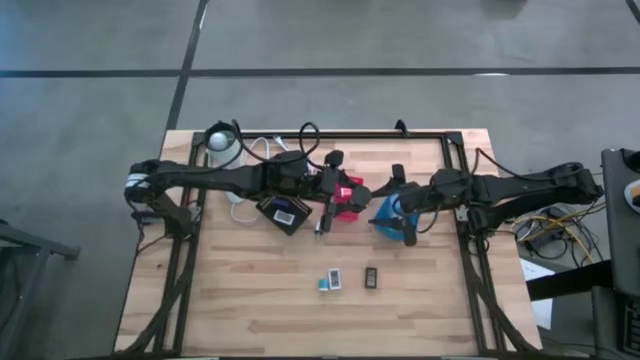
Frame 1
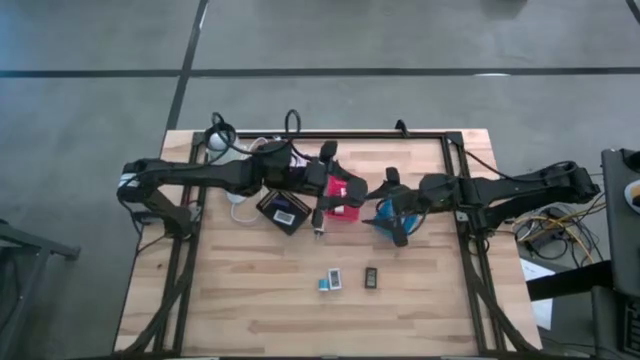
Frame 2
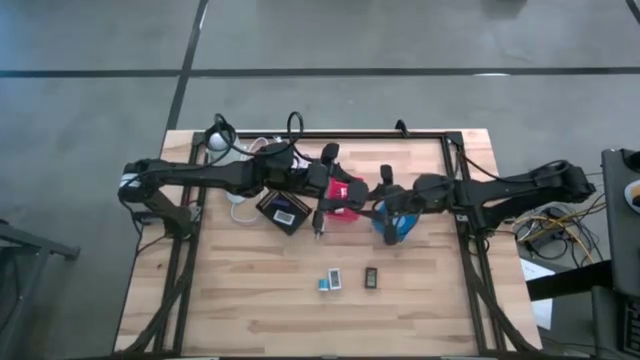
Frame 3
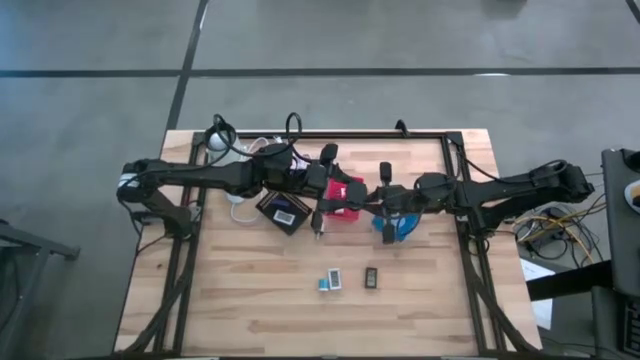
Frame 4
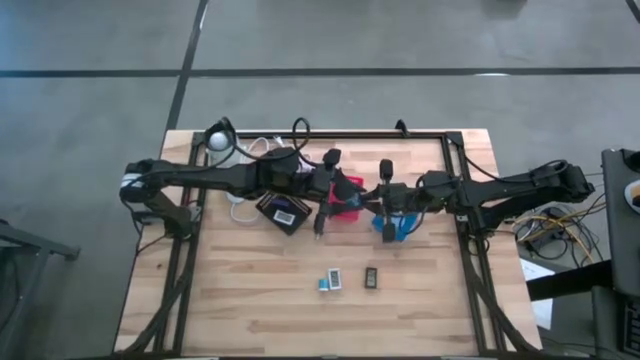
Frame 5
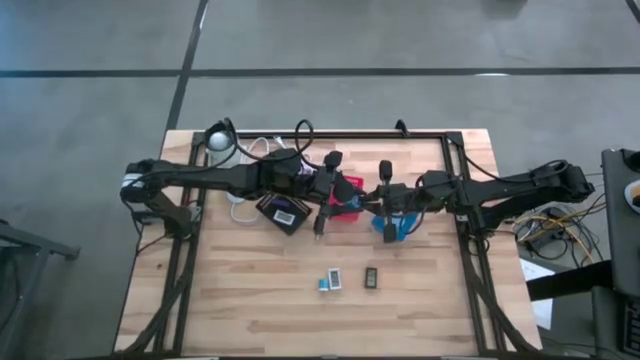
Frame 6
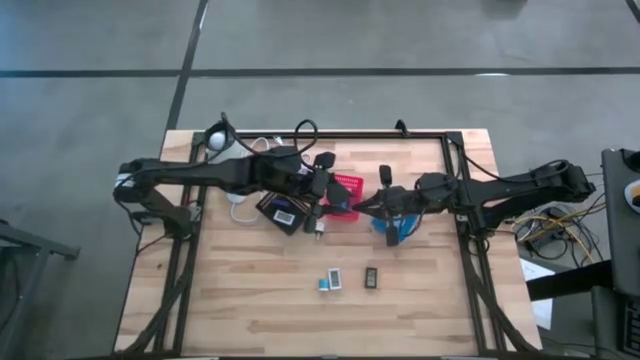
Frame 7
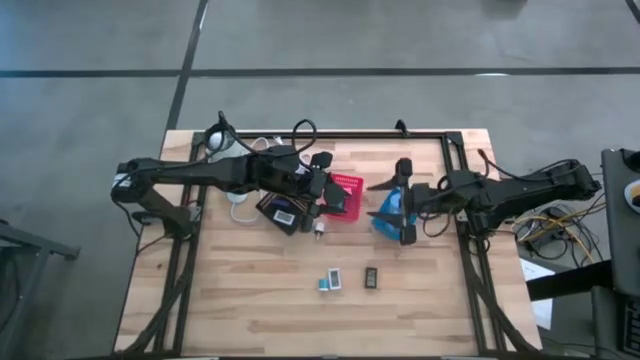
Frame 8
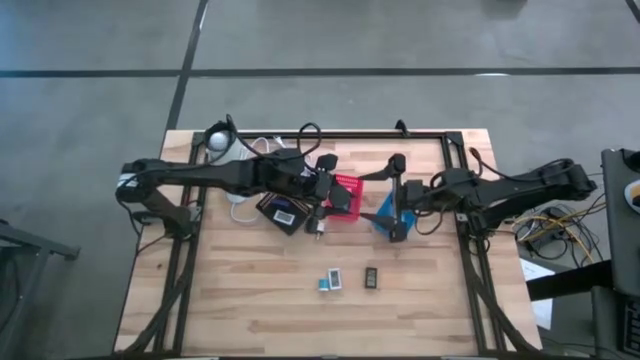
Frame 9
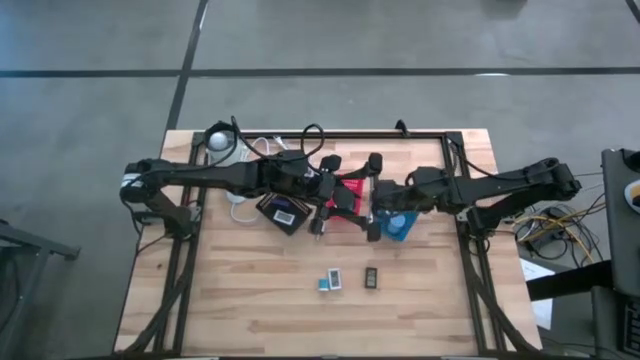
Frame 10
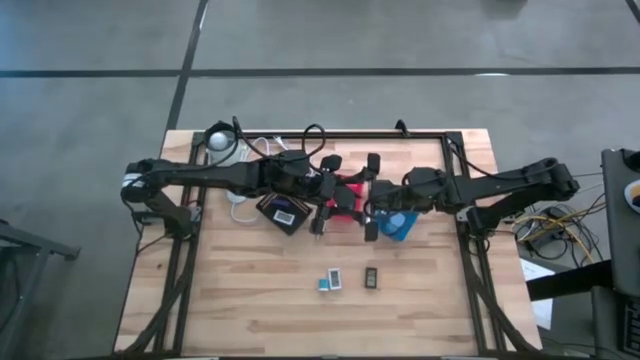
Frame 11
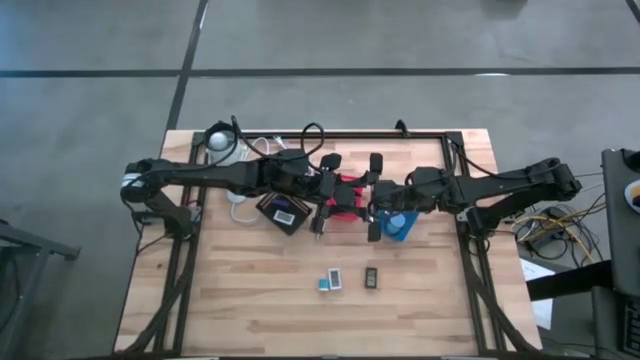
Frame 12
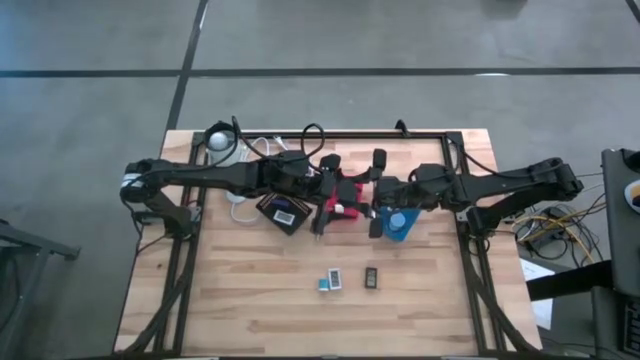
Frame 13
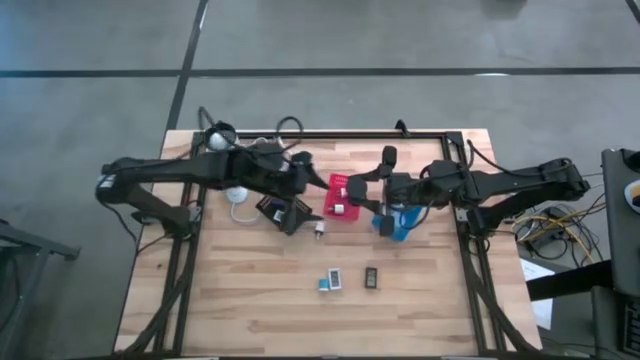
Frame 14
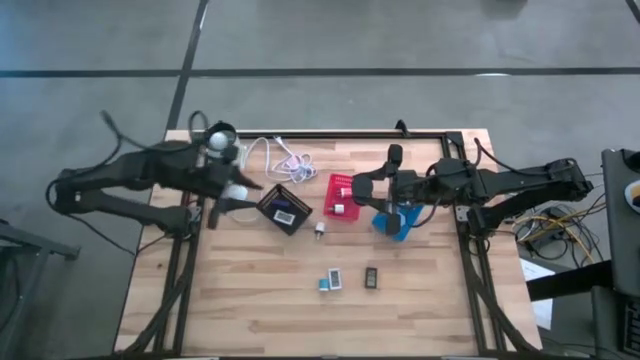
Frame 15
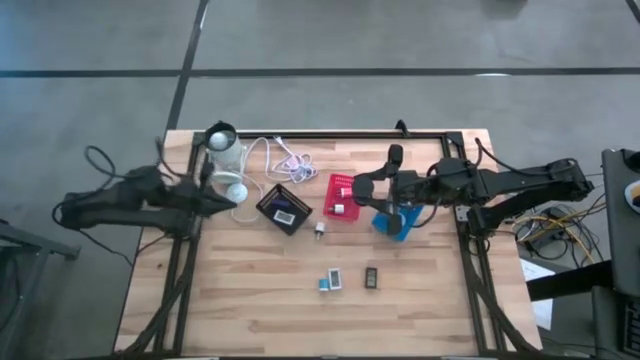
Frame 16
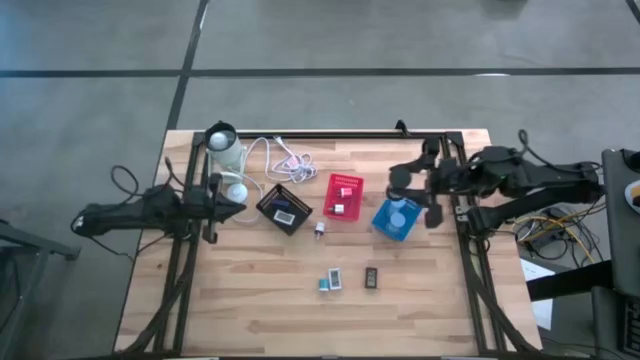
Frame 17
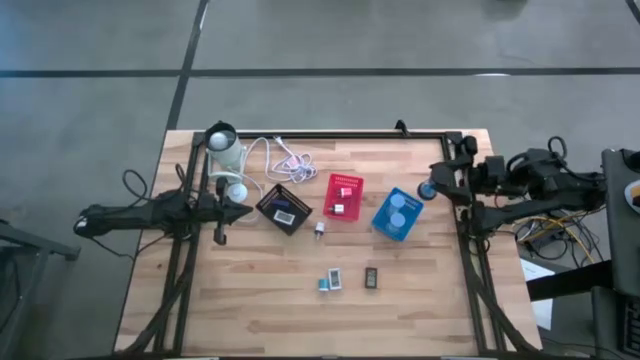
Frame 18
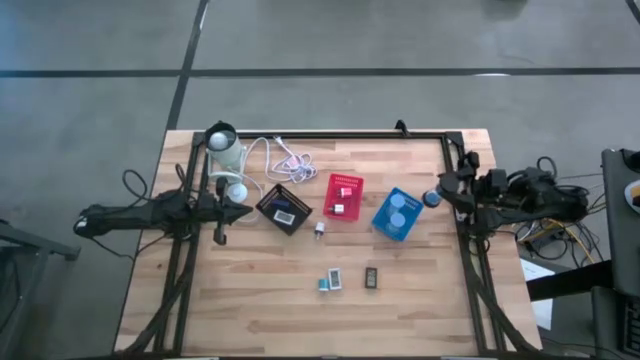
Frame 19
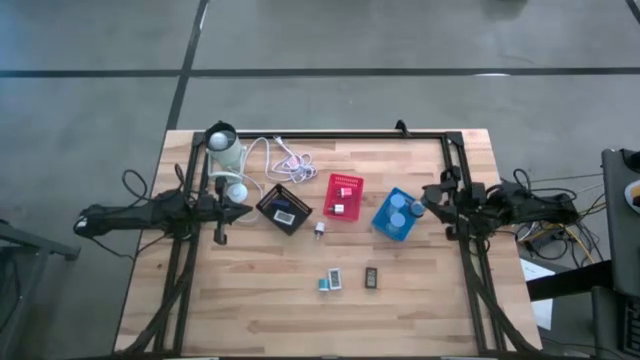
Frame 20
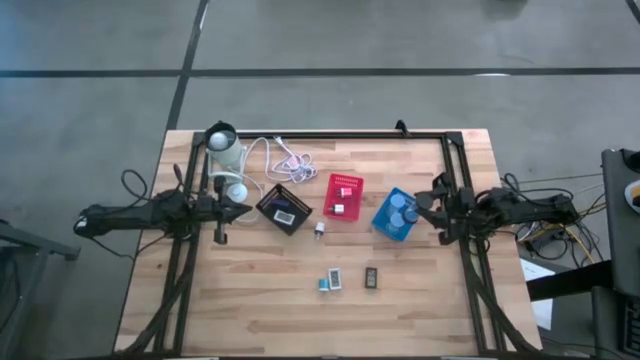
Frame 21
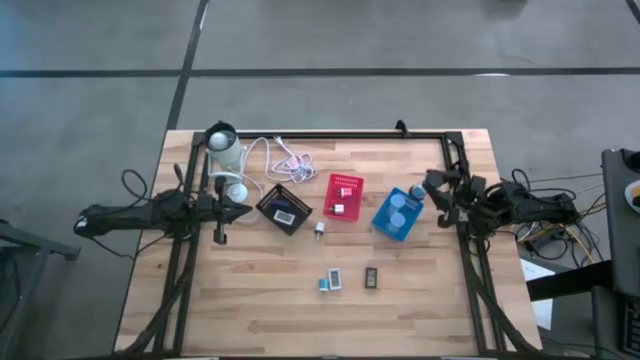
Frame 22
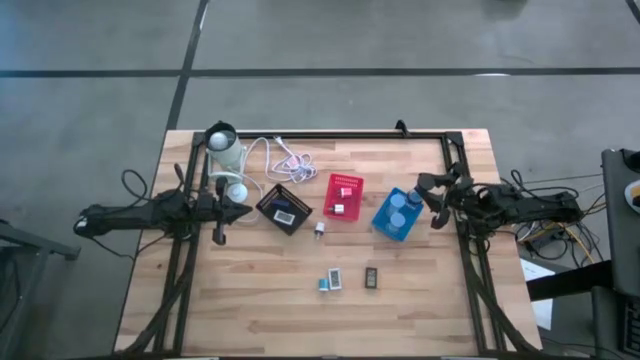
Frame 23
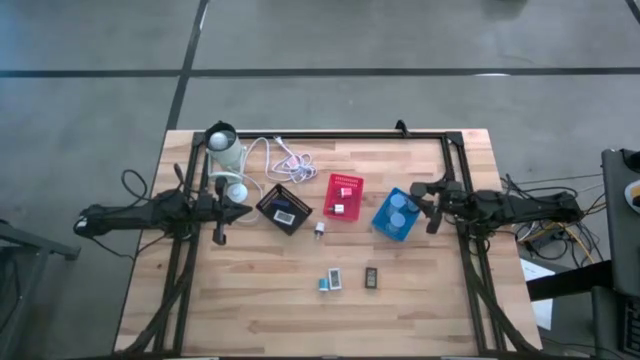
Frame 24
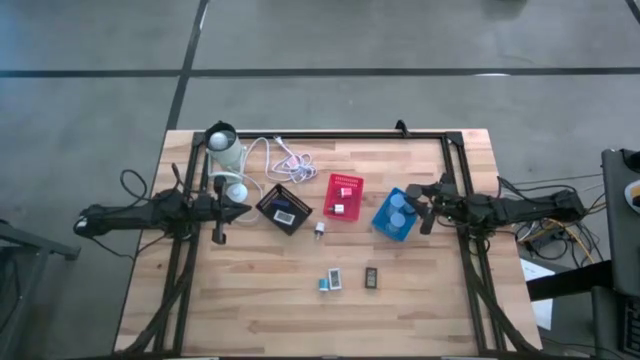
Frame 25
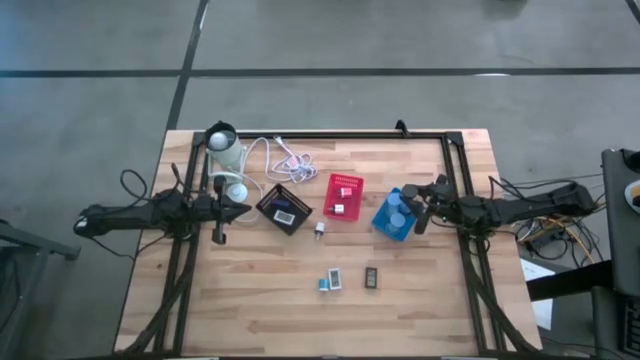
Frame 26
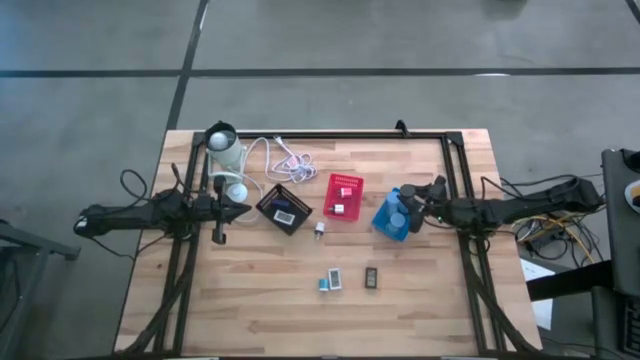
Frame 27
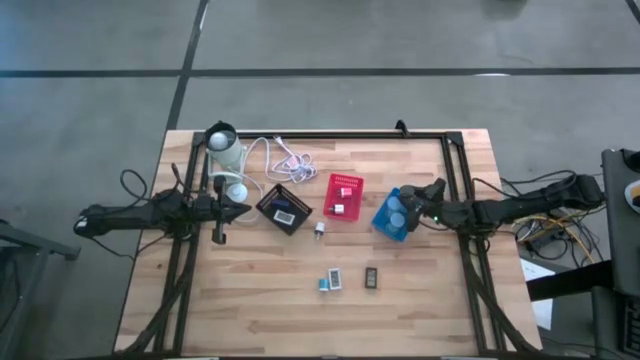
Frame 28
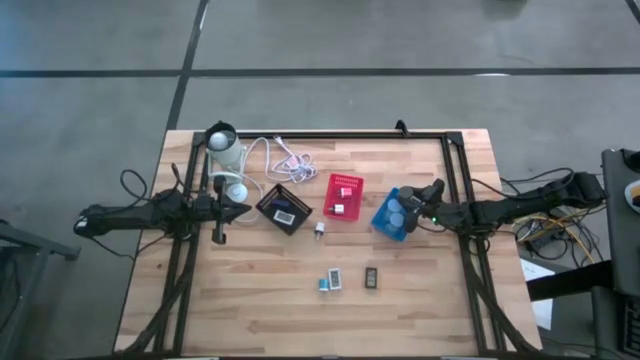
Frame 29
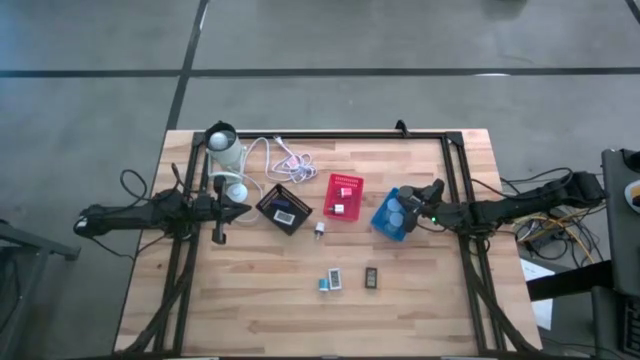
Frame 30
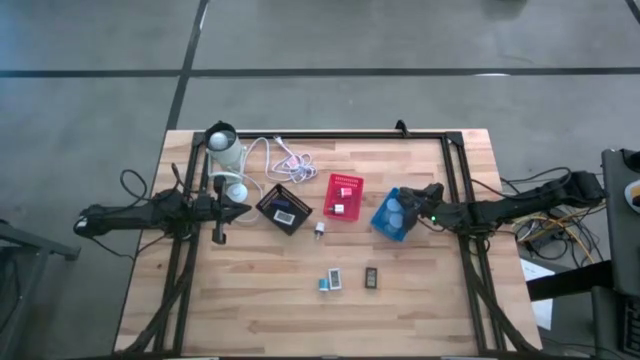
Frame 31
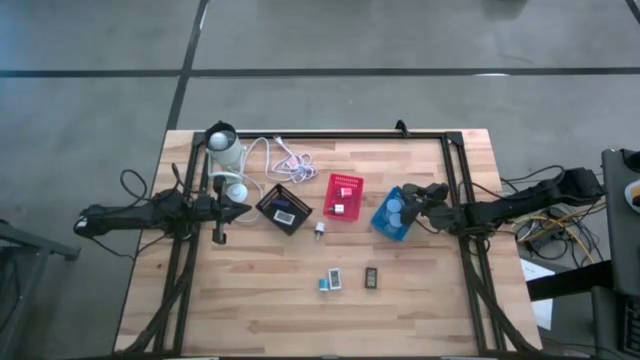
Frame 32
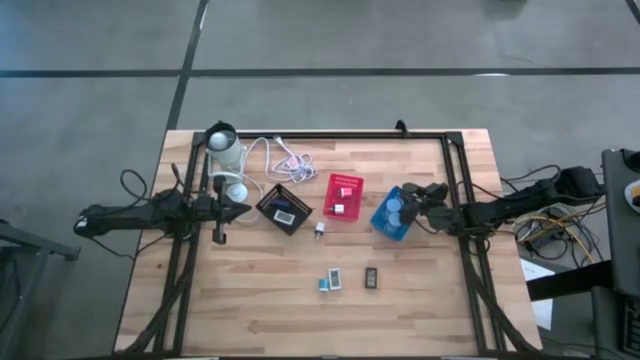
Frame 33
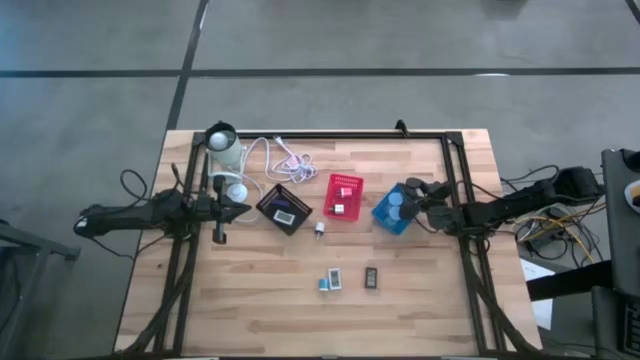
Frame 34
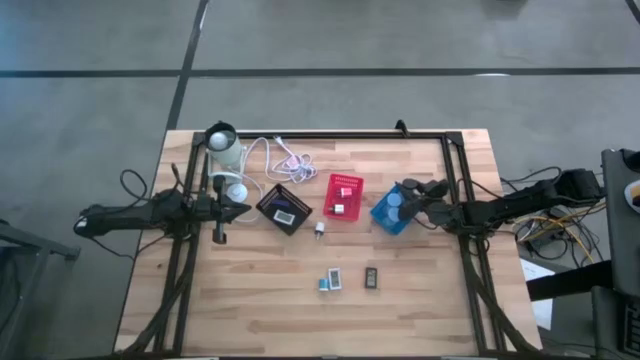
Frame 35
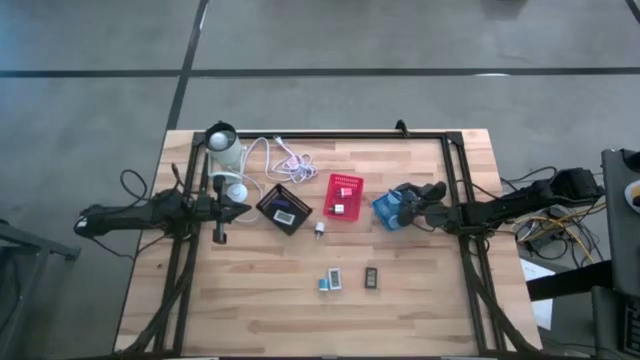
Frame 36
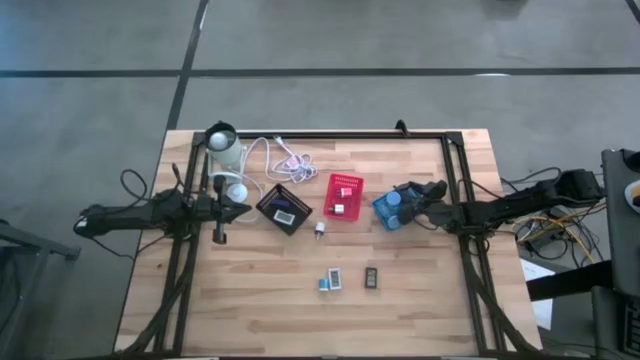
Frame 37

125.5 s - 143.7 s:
Task: Pick & Place Office items
Put the black hourglass into the blue basket

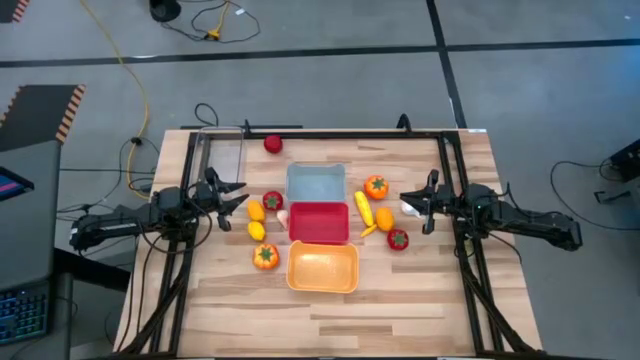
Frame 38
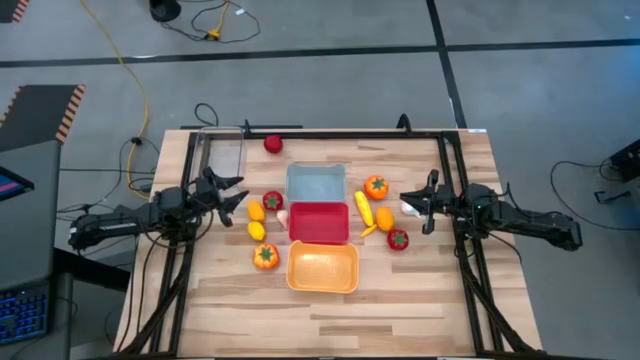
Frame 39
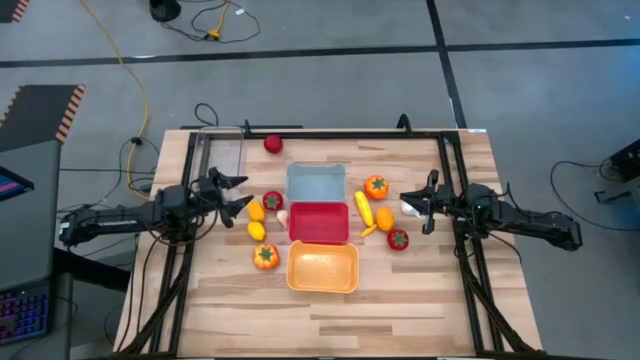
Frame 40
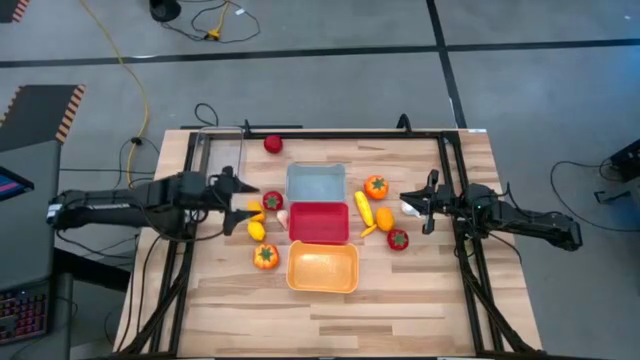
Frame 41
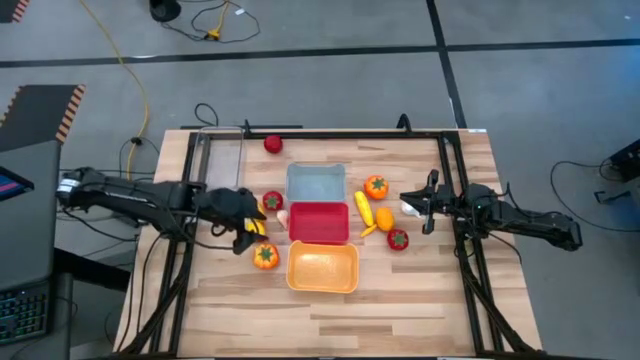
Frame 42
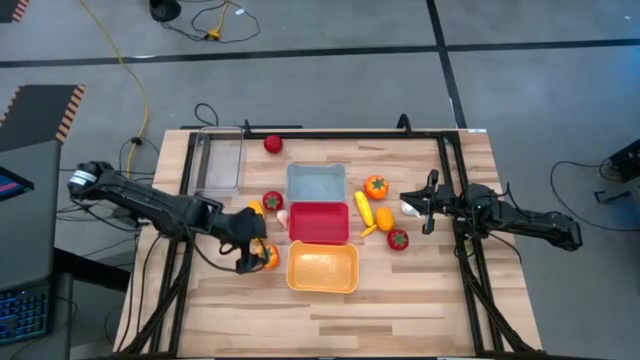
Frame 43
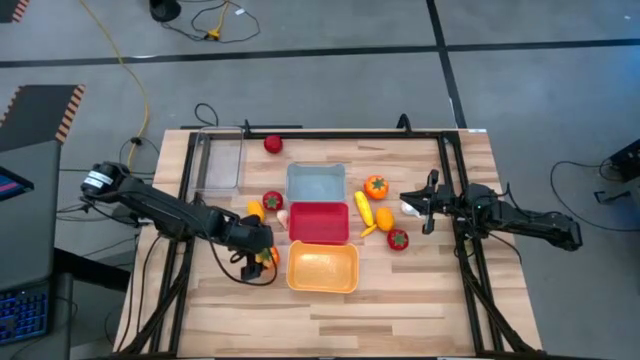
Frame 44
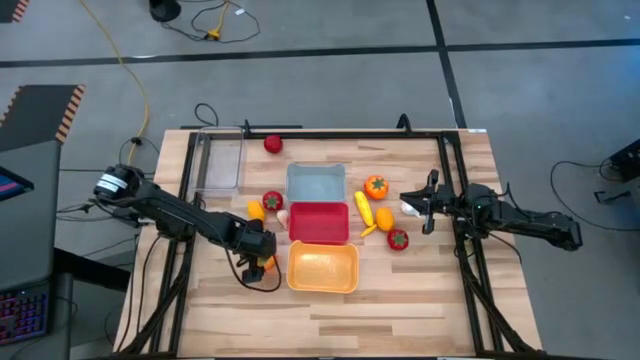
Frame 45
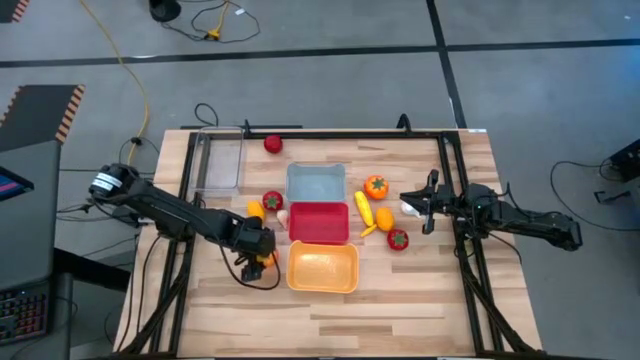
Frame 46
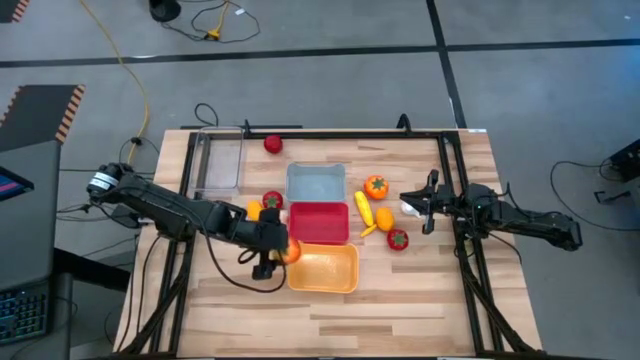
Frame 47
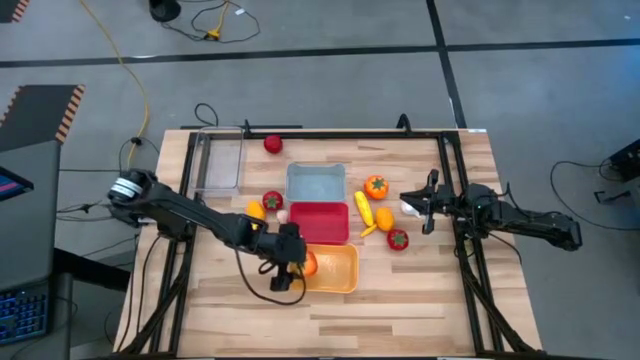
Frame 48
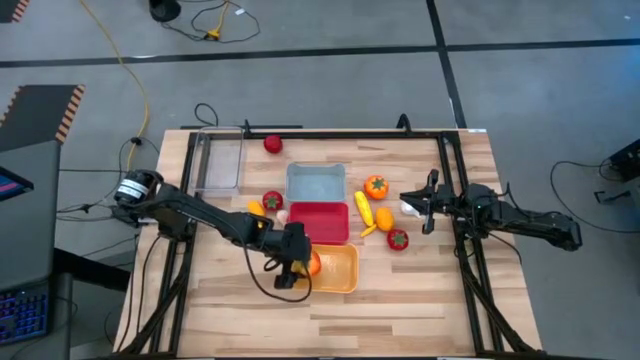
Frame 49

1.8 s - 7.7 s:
Task: Sort produce into baskets
Put the bottom orange tomato into the yellow bin
